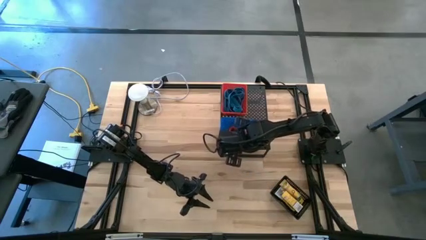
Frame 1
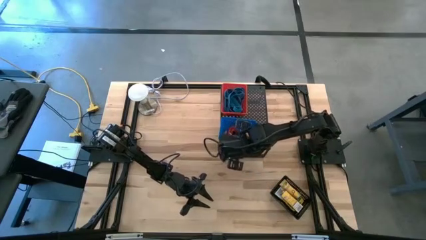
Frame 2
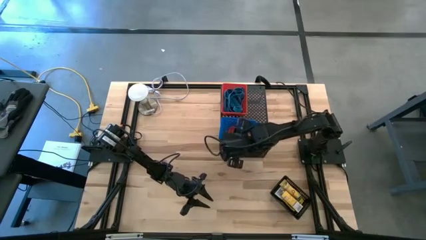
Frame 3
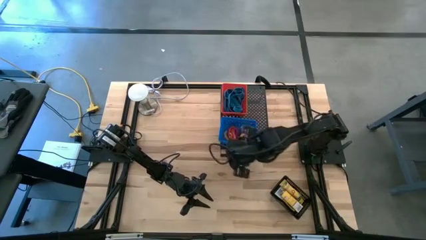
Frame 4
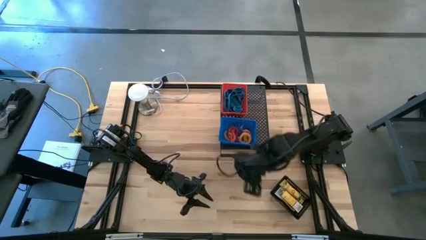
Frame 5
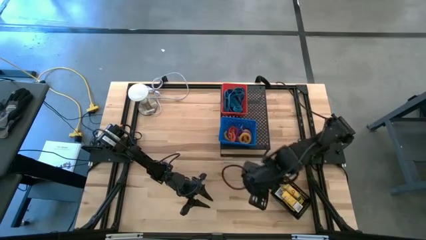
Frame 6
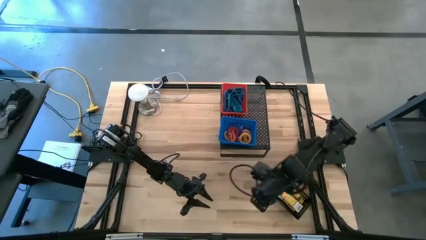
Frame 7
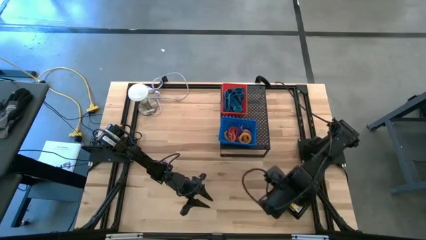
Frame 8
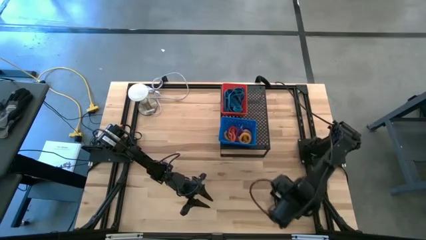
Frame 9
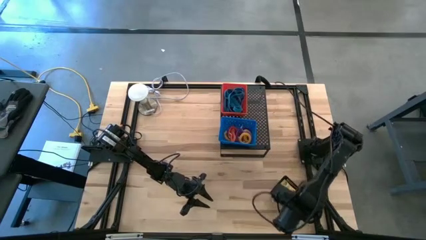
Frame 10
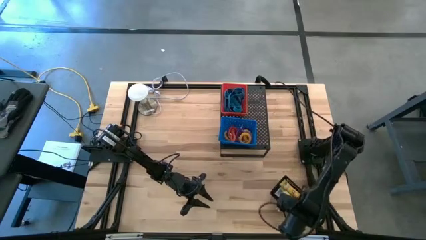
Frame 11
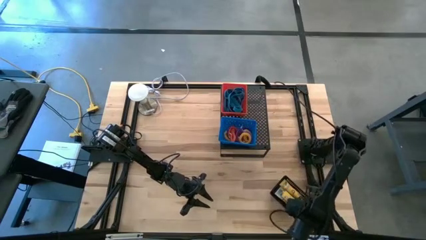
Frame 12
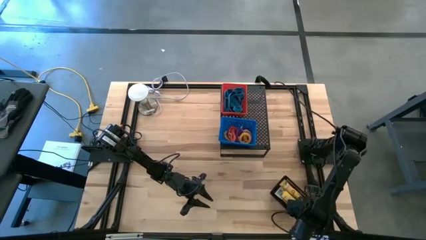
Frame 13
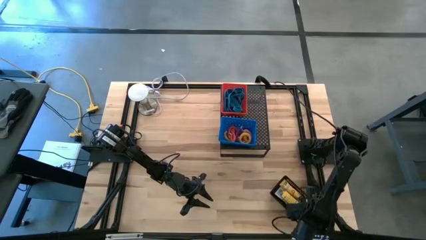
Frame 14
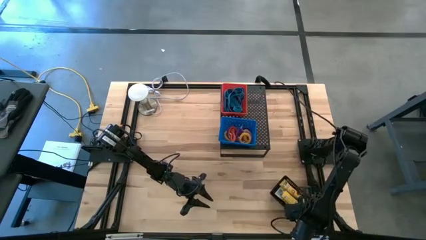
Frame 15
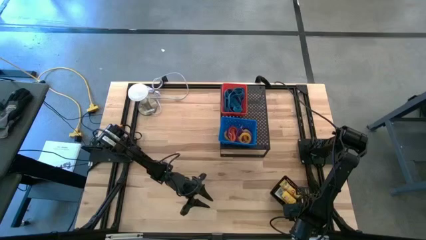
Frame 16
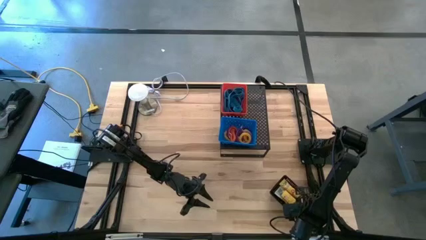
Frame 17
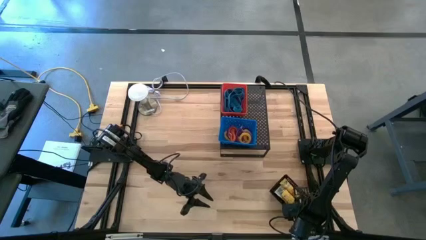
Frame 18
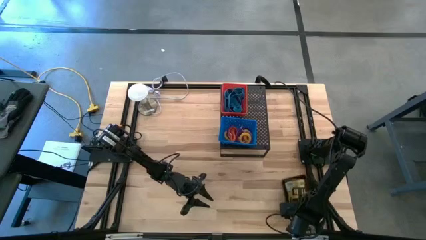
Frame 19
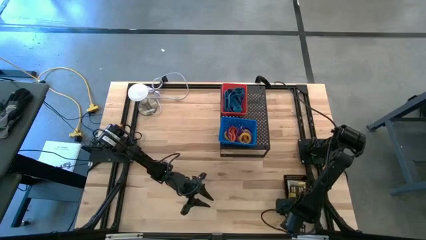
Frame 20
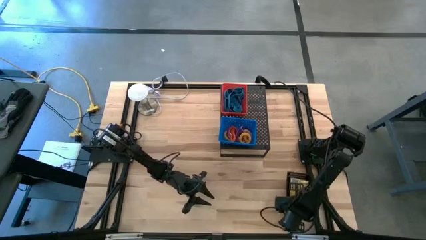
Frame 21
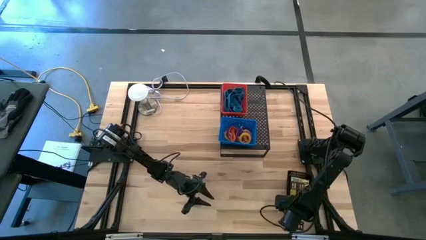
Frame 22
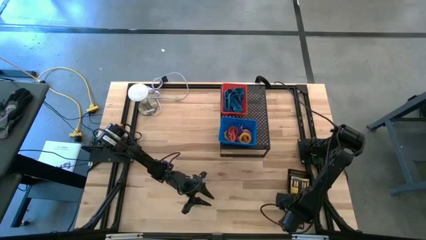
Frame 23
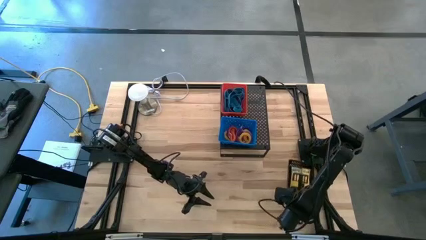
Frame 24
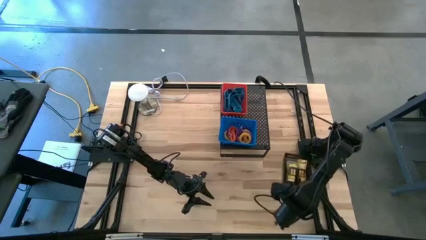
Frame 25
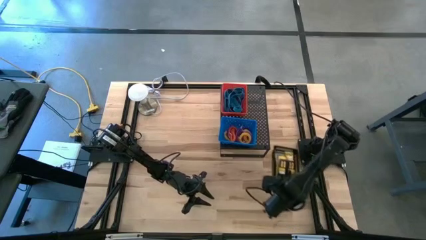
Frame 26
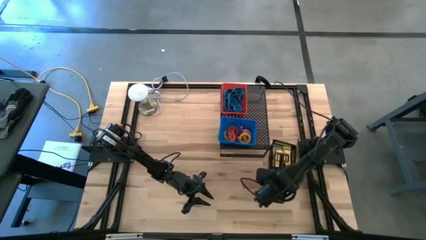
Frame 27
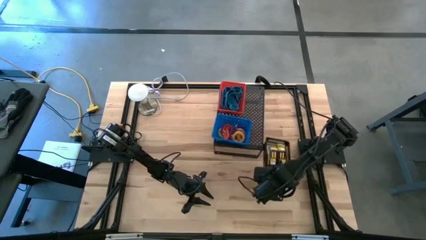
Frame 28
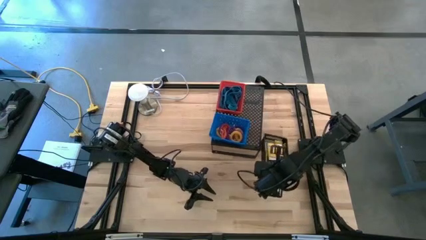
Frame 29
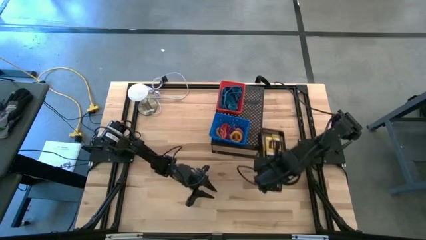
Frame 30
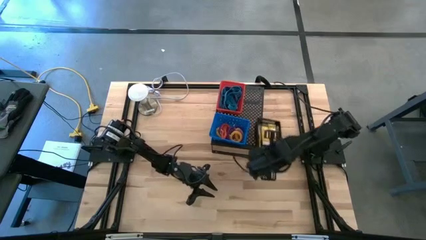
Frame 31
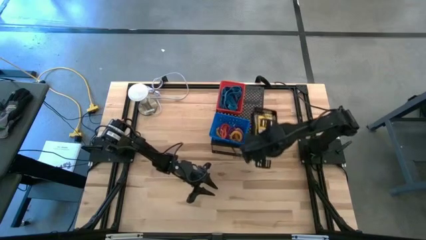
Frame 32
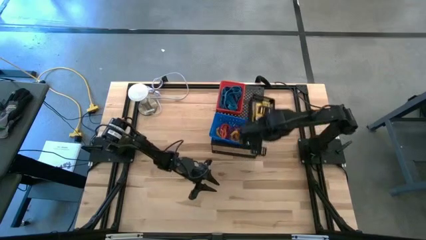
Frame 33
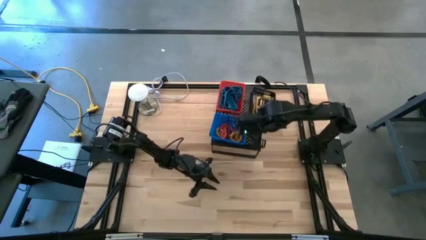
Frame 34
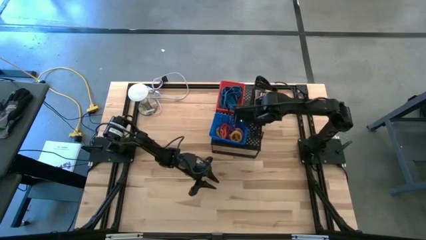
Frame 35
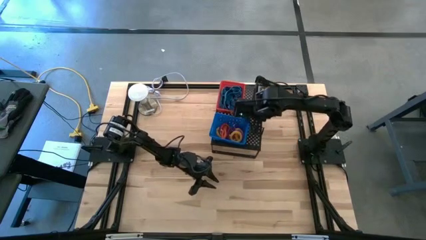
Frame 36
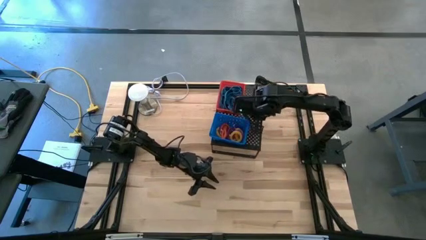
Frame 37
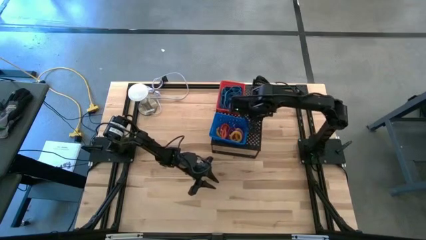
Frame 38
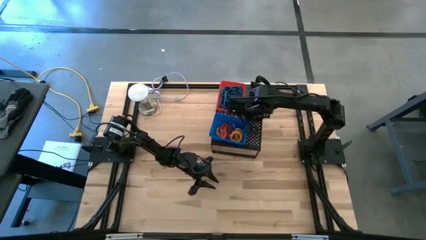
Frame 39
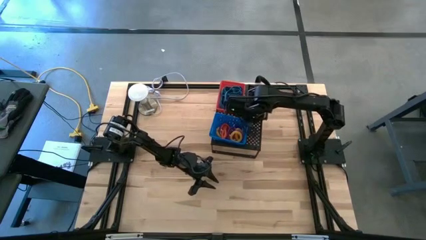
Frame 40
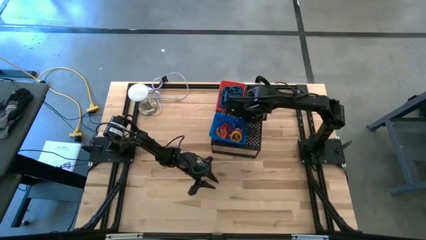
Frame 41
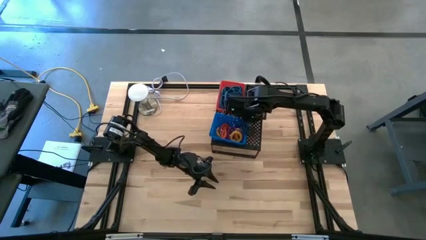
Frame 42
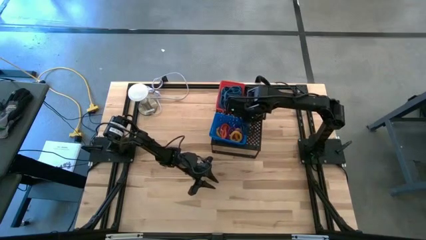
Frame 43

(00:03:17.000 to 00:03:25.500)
Task: Pick & Place Office Desk Supplies
Put the black basket on the shelf

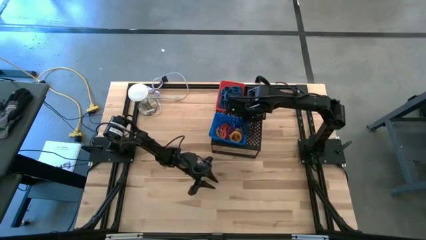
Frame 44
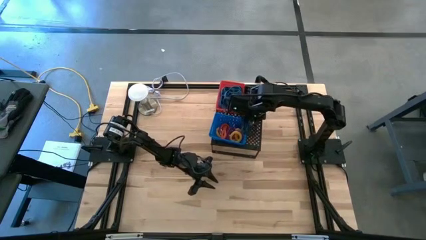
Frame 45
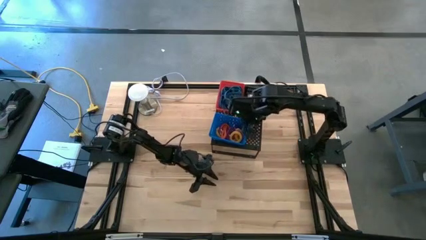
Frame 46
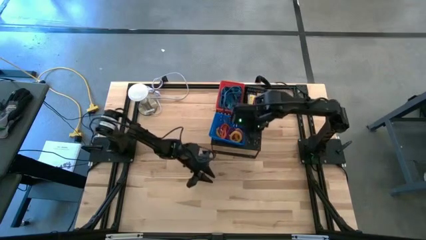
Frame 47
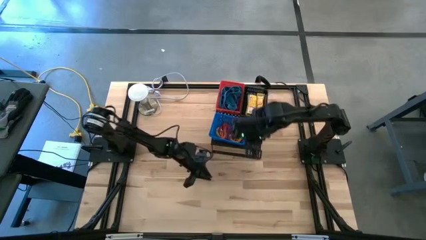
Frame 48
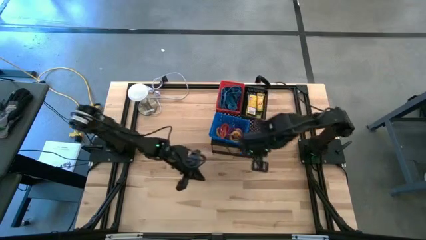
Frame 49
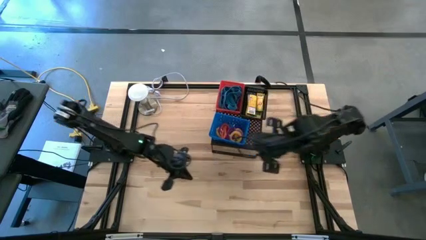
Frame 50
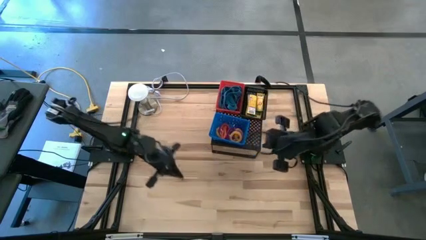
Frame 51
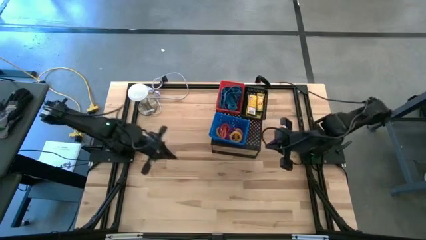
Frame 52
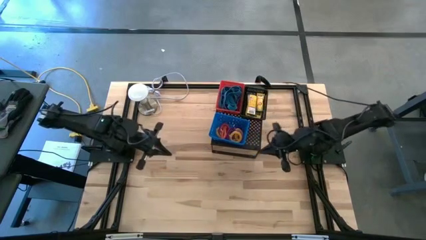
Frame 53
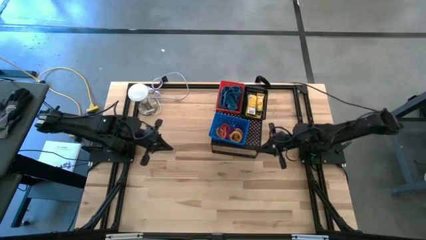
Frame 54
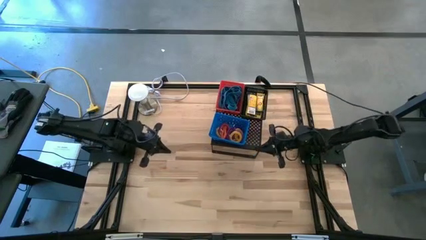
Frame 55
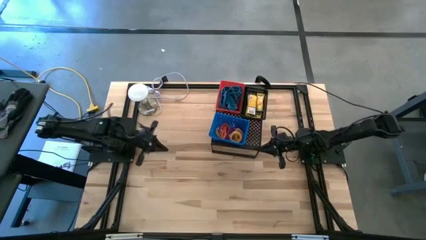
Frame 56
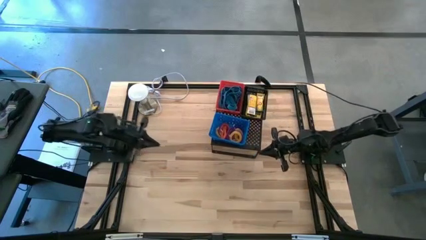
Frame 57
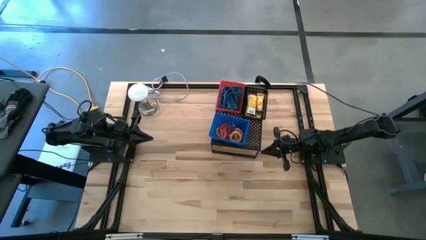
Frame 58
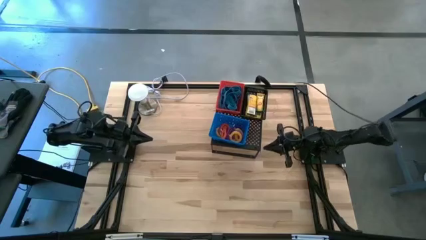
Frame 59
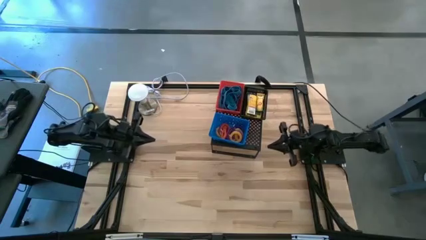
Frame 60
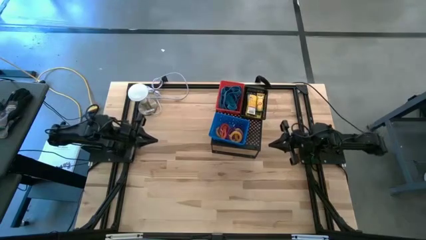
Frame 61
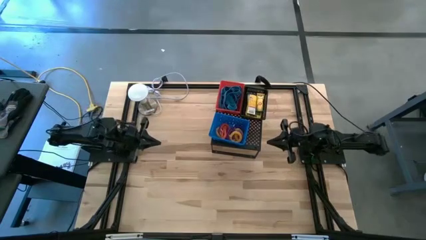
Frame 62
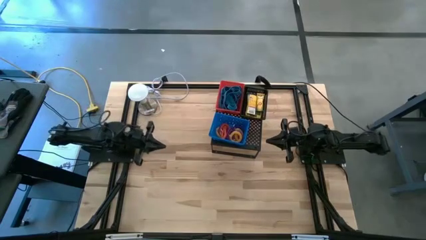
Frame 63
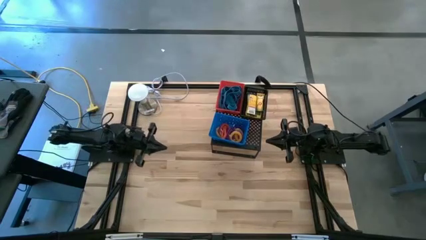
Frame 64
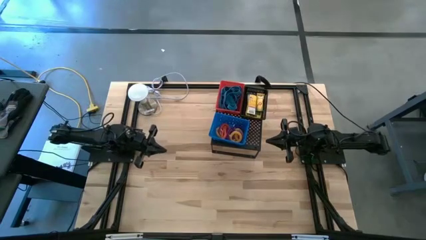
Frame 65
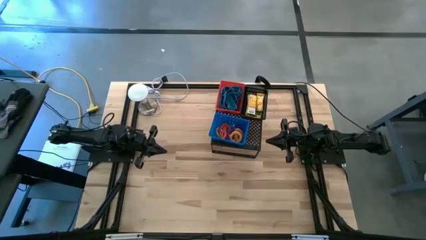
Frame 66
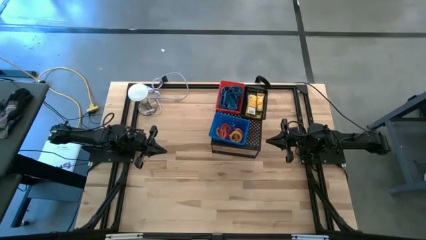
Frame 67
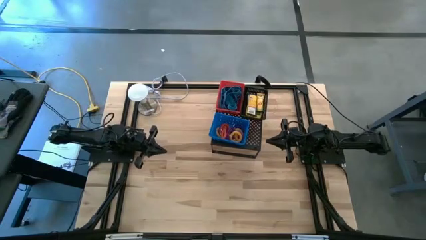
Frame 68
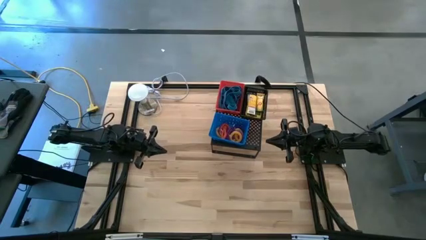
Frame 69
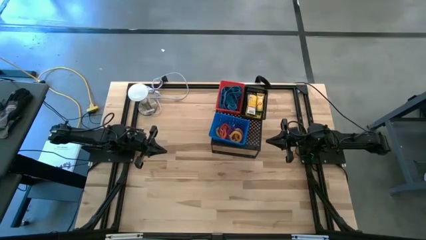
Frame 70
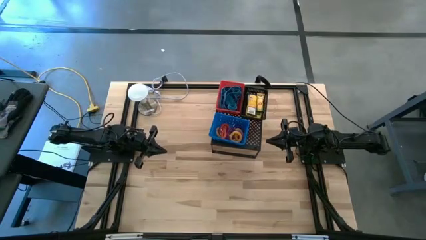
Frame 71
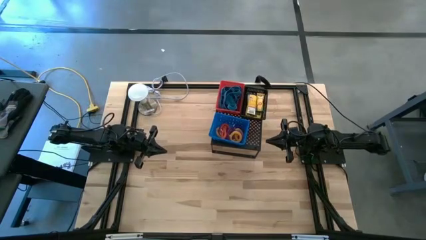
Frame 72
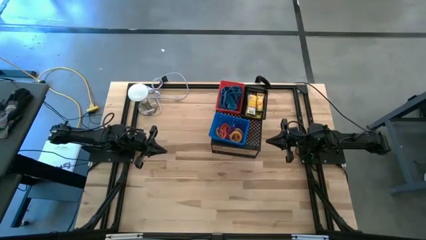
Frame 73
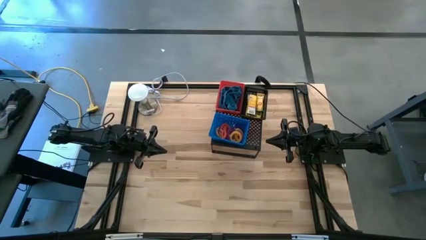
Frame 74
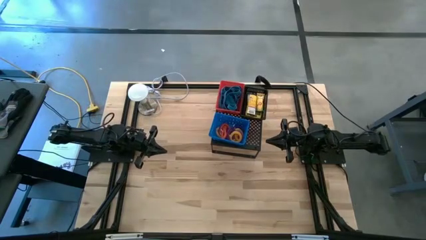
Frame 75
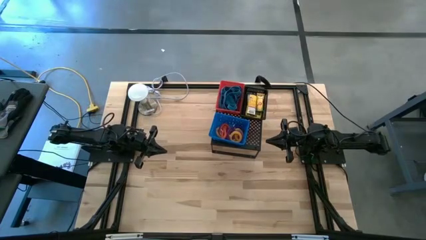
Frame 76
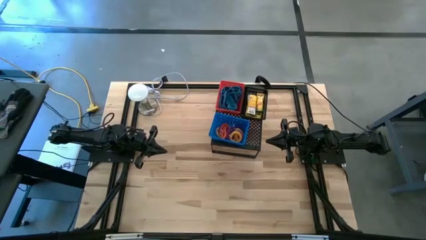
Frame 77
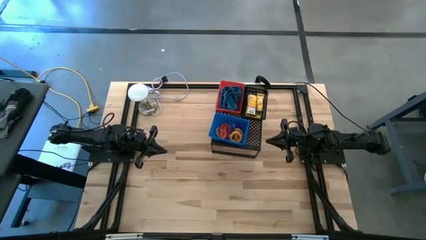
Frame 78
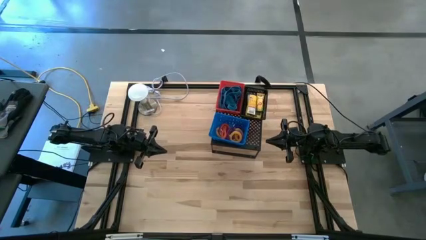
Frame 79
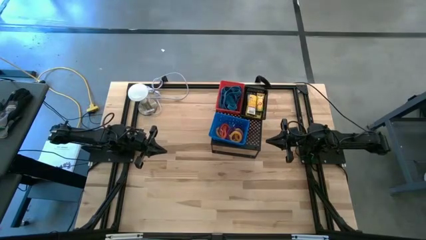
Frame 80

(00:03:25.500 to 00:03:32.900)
Return to Home Position
